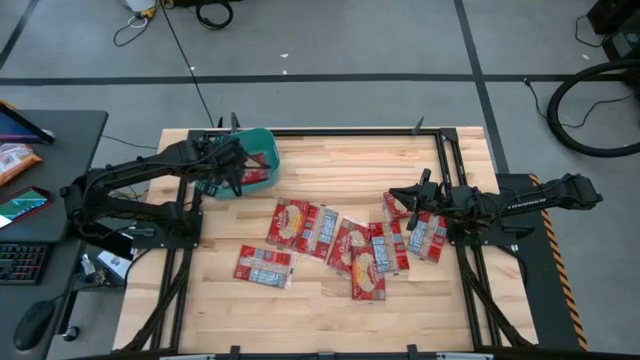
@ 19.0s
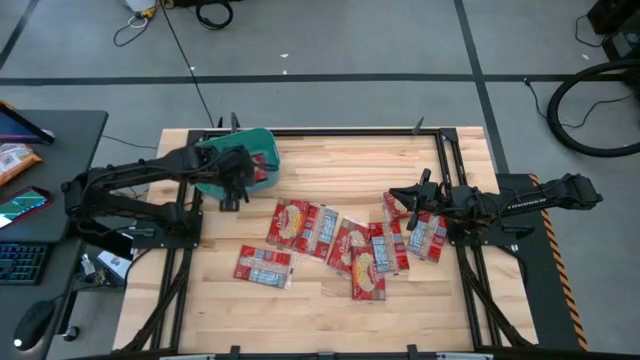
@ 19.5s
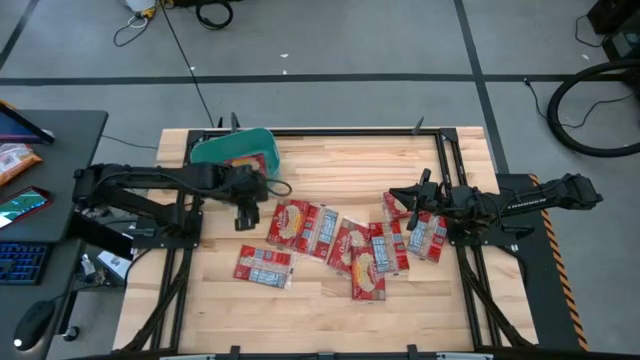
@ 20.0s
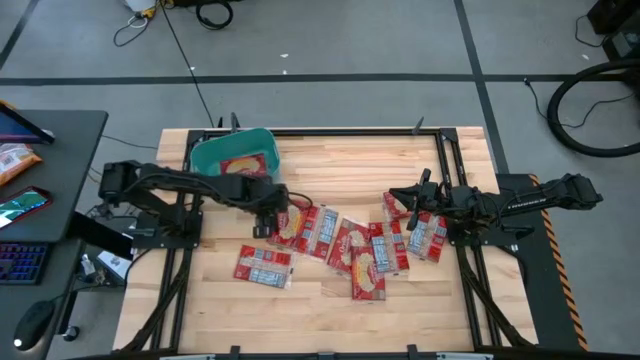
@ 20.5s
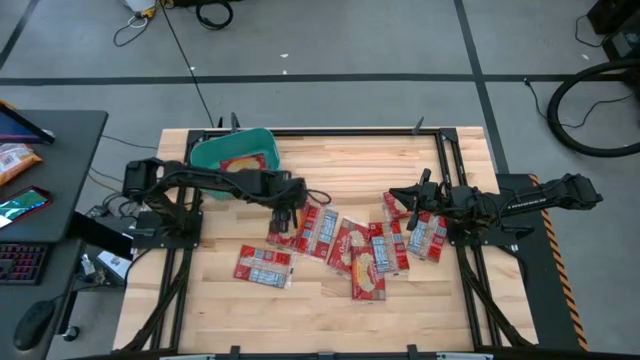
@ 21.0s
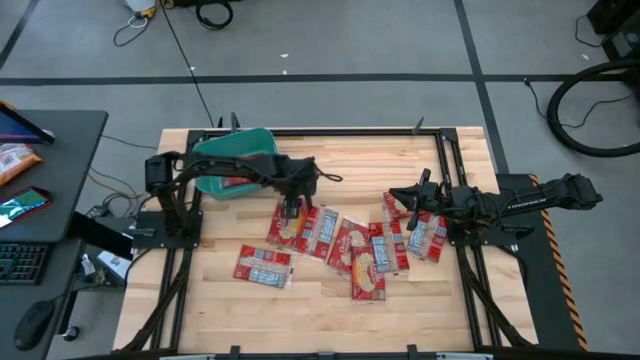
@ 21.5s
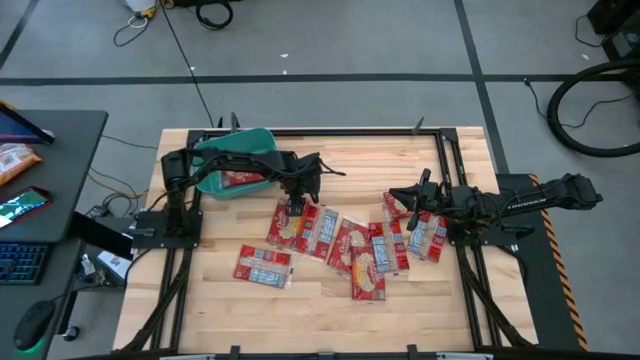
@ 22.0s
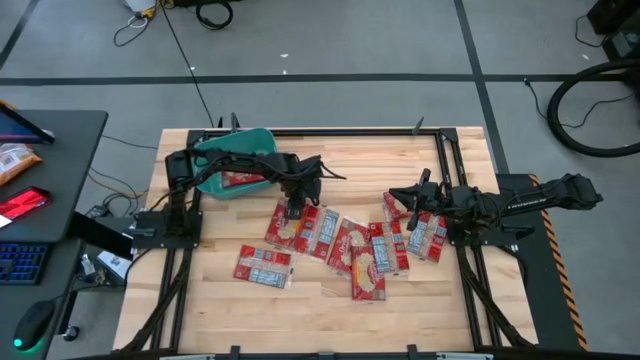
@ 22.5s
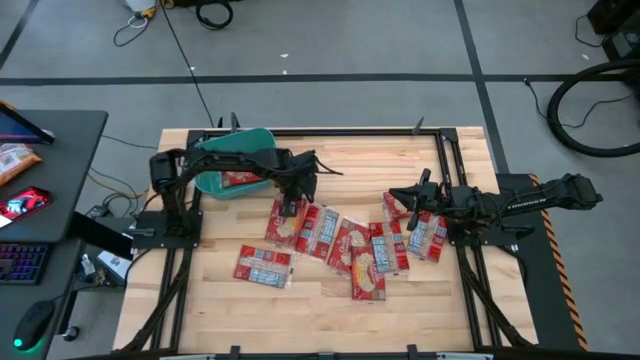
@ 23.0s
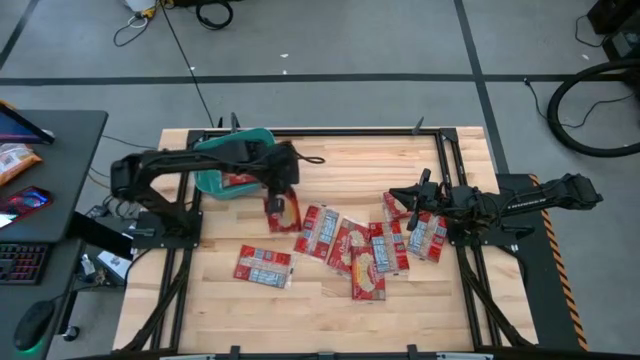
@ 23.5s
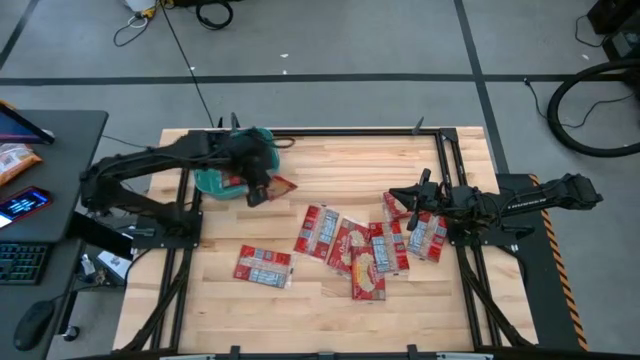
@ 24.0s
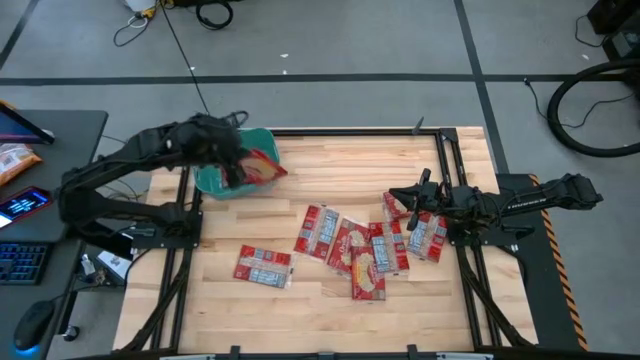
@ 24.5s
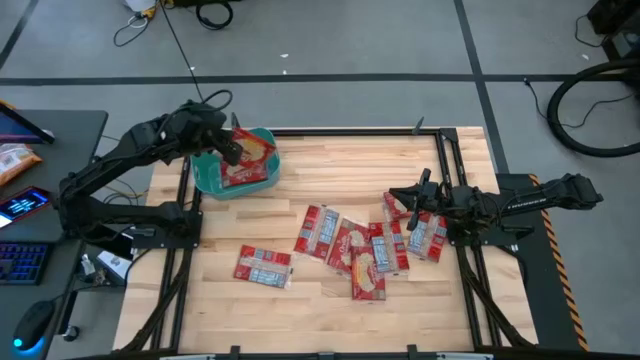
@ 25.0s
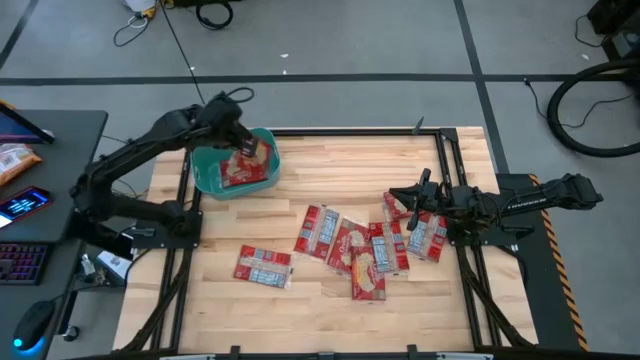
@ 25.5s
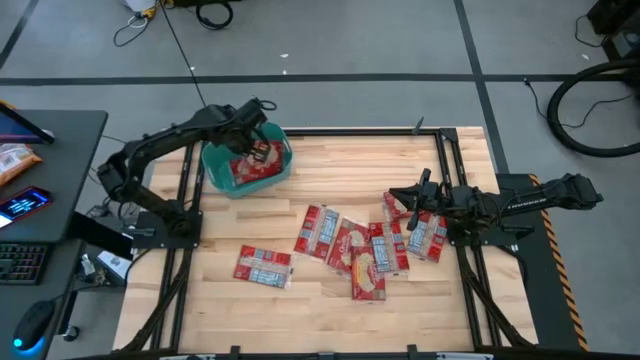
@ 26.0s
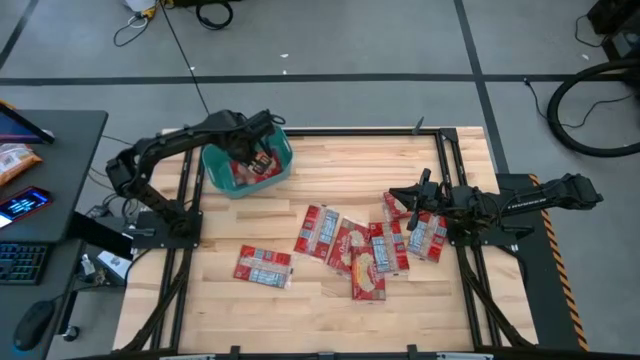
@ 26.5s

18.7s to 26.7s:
Task: Sort popcorn bags into baskets
Put the red popcorn bag into the green bin

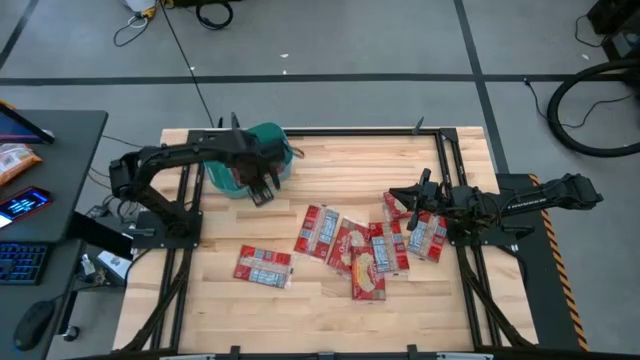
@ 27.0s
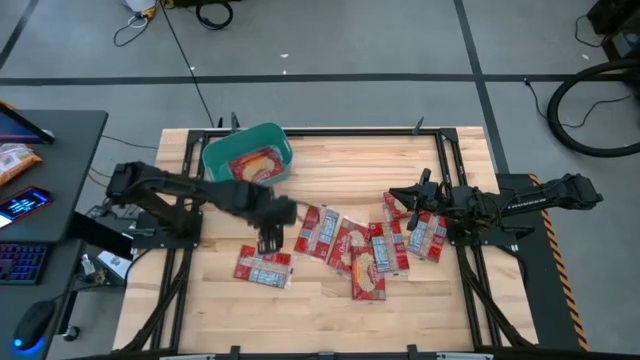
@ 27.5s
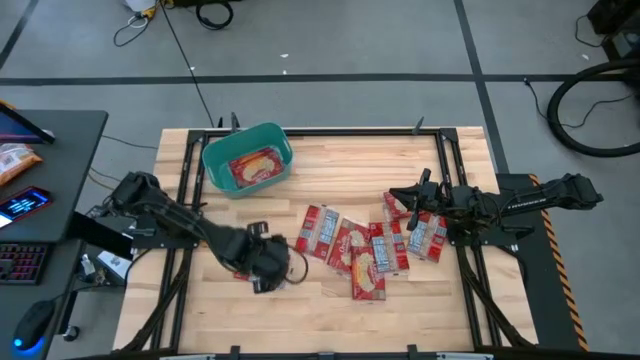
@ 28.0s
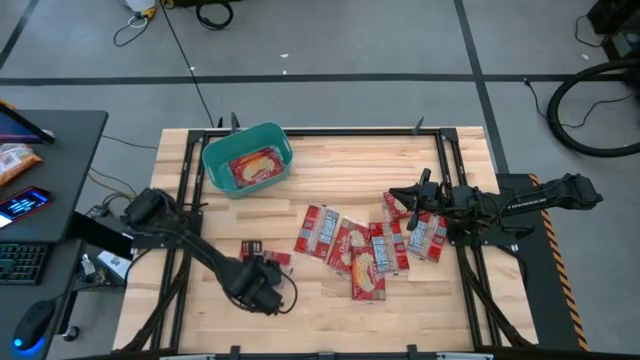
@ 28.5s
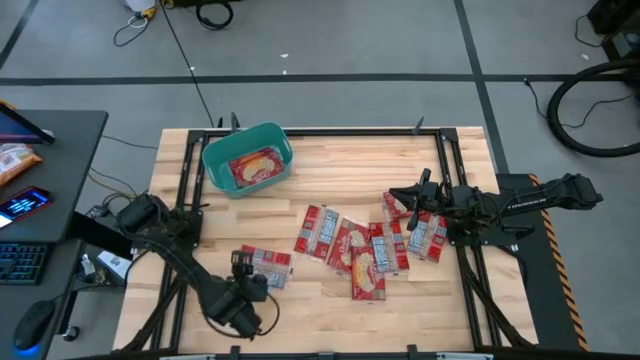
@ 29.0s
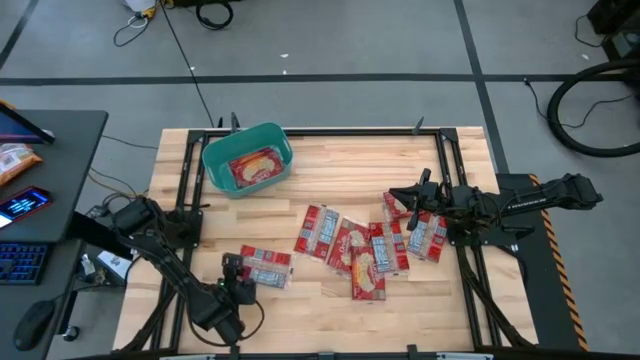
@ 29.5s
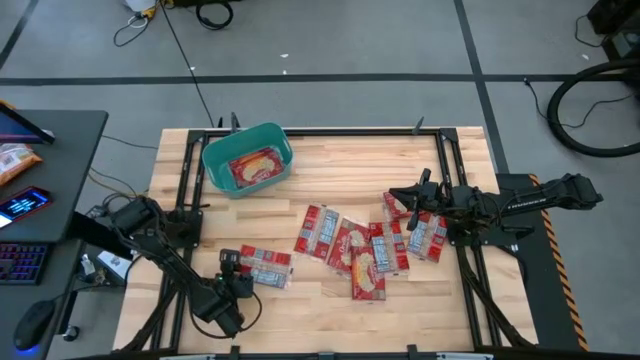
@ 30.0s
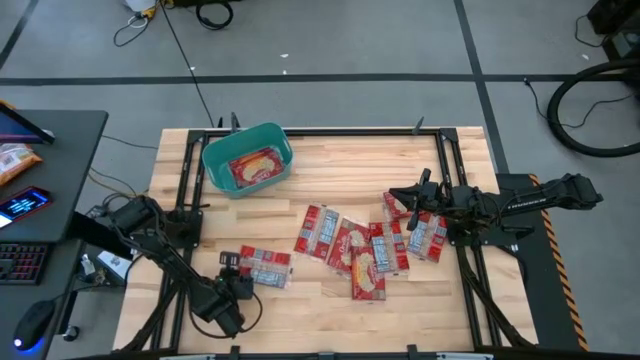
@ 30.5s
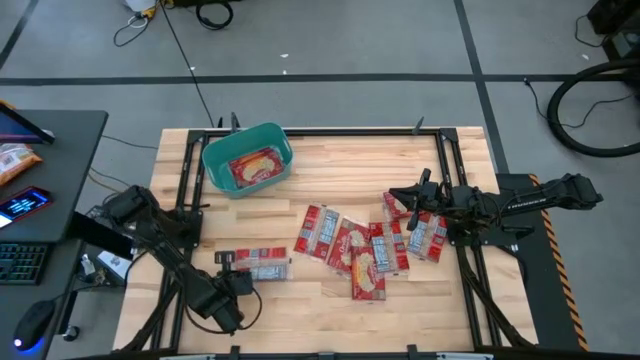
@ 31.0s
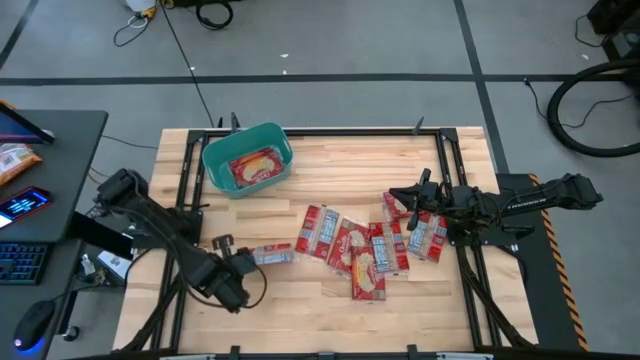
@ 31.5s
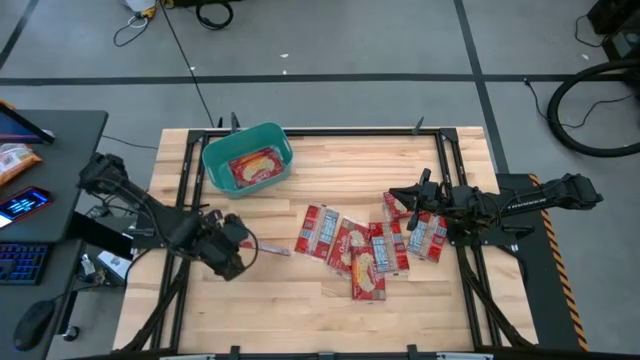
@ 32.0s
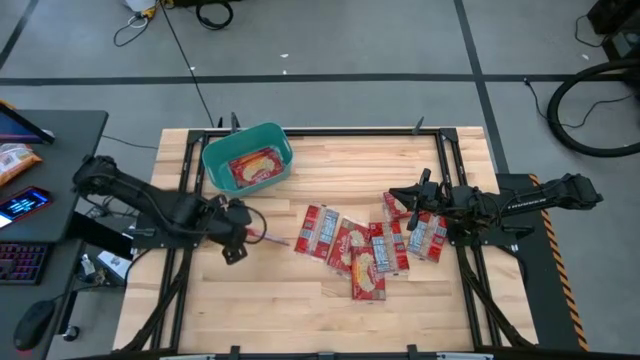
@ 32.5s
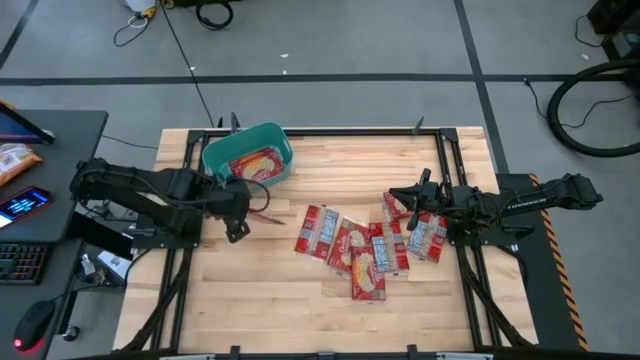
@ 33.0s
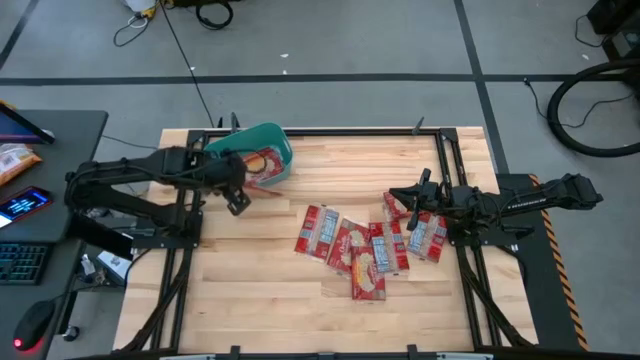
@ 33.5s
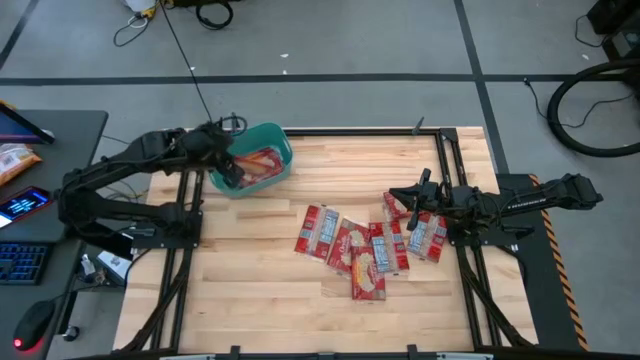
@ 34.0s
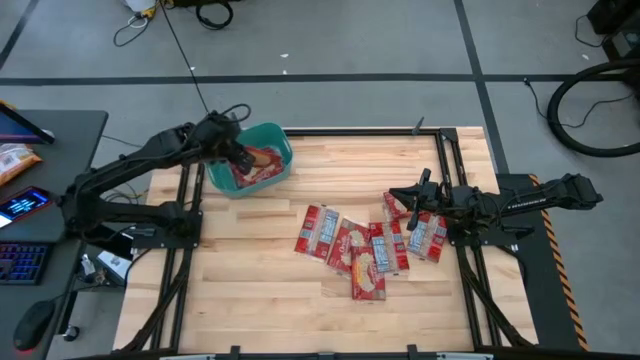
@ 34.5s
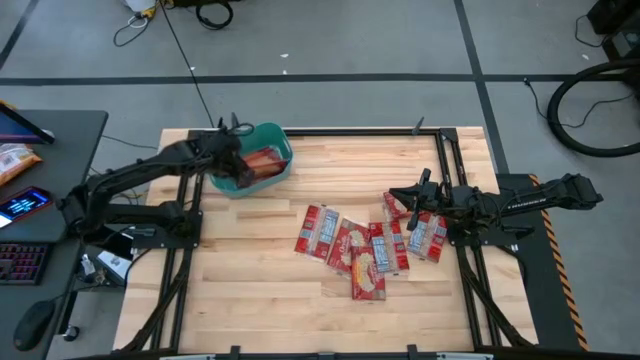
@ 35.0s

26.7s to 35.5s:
Put the red popcorn bag into the green bin

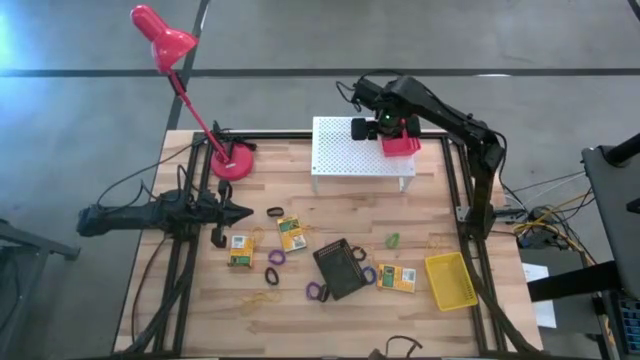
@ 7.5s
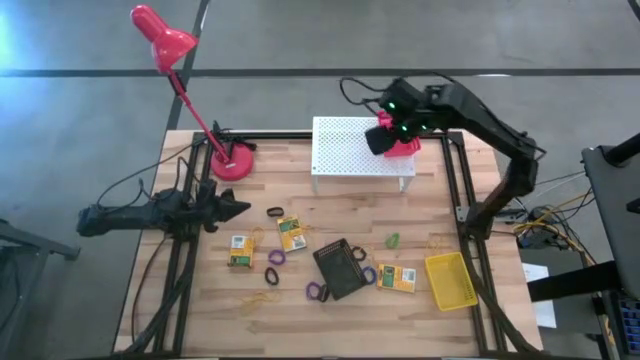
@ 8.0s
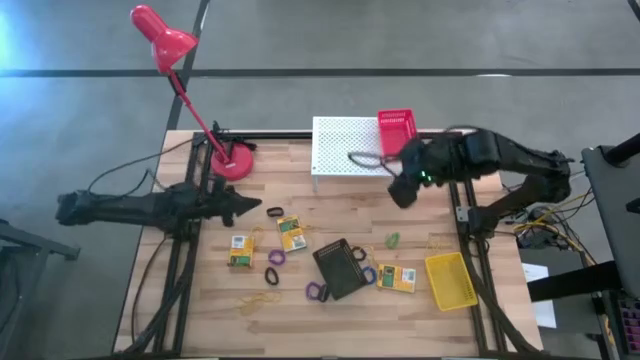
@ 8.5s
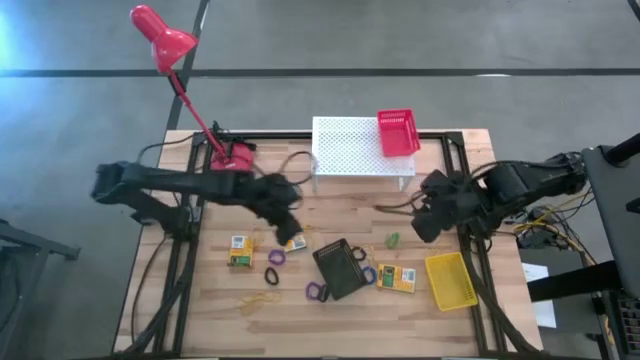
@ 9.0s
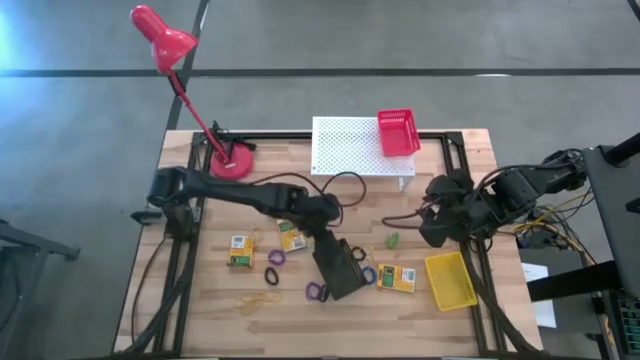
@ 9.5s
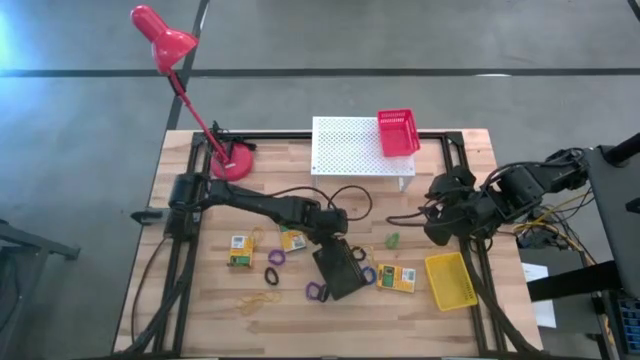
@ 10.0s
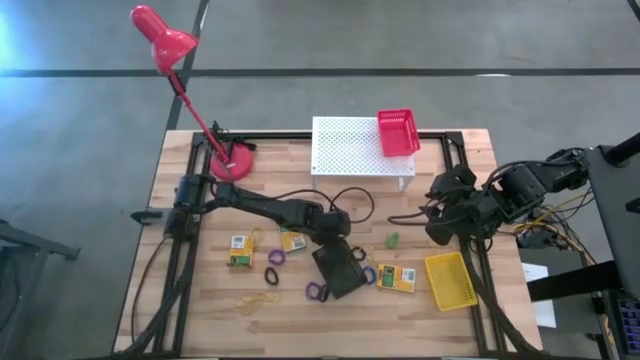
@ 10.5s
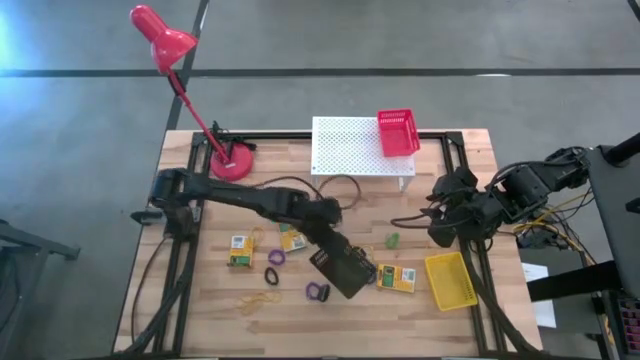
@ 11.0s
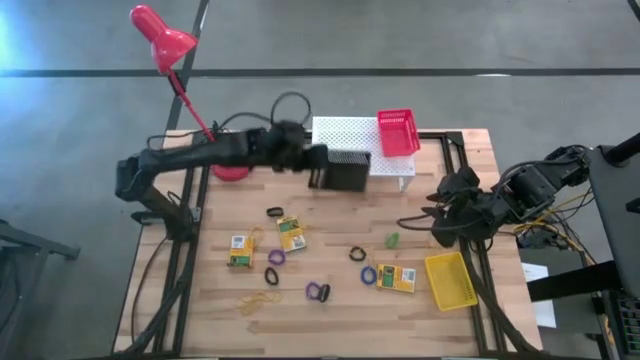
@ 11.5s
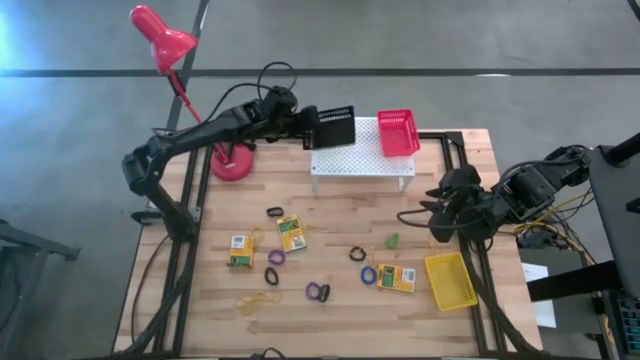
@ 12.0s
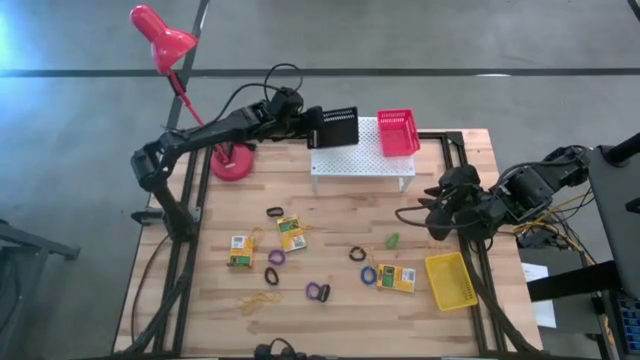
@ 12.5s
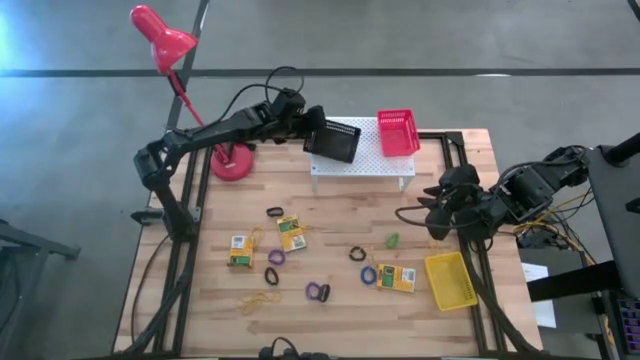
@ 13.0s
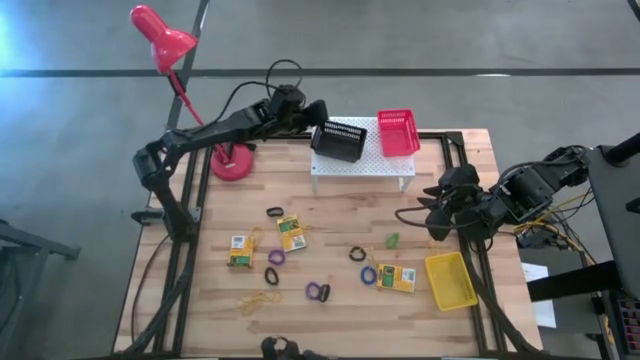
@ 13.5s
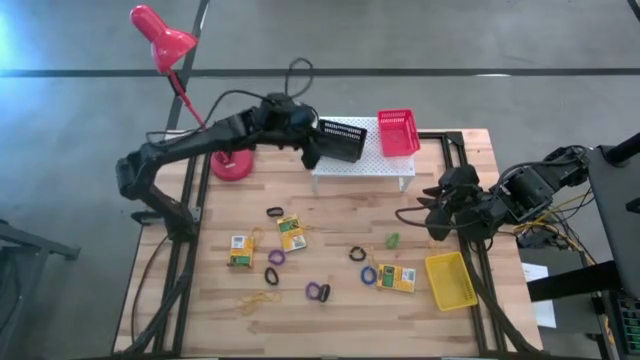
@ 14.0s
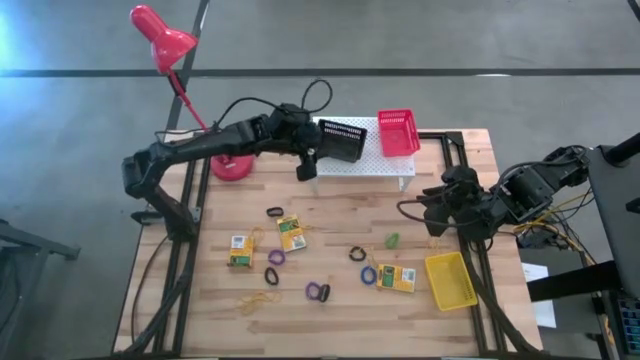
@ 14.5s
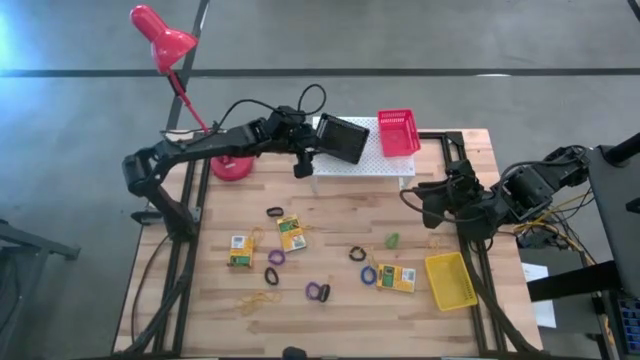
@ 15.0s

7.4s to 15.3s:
Task: Pick & Place Office Desk Supplies
Put the black bin on the shelf
